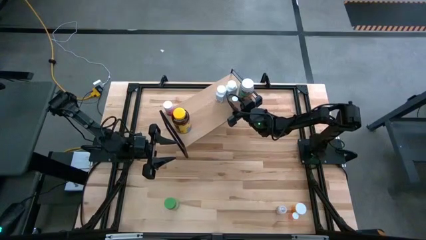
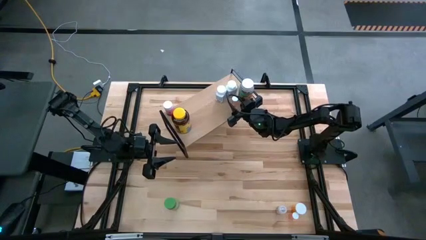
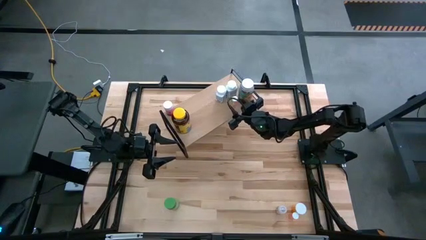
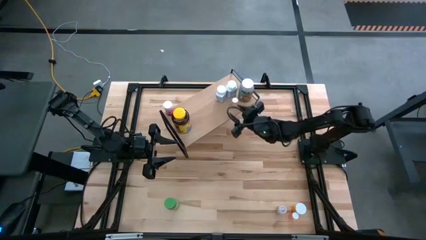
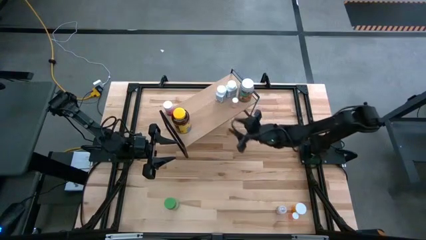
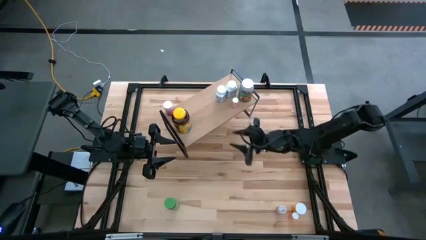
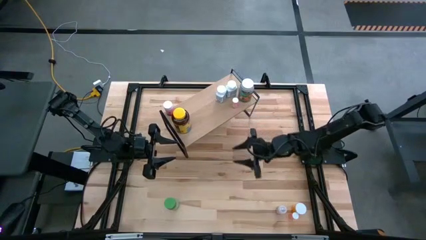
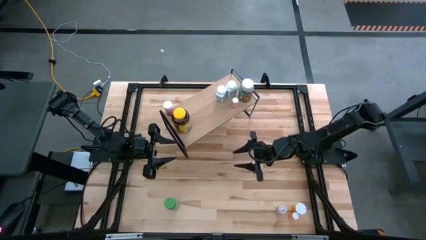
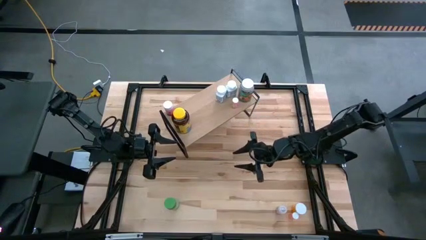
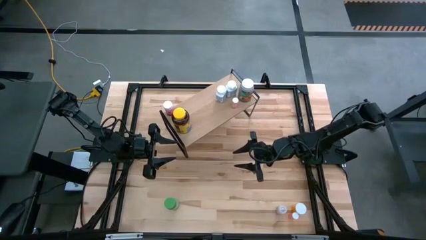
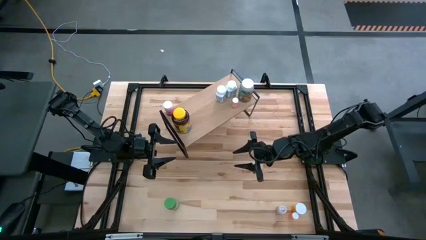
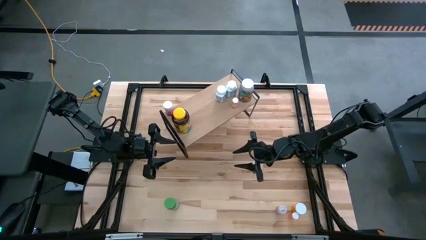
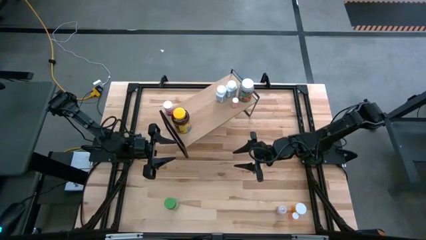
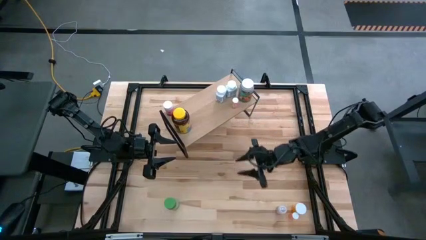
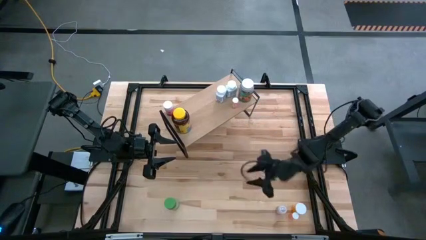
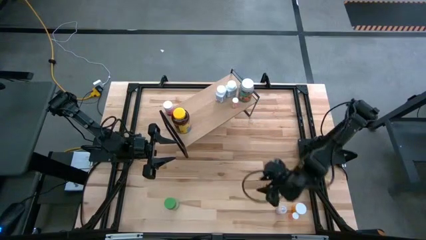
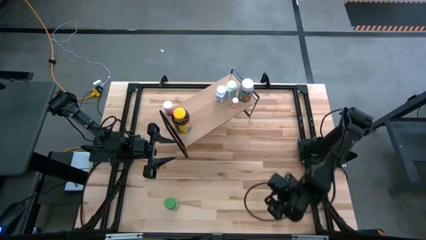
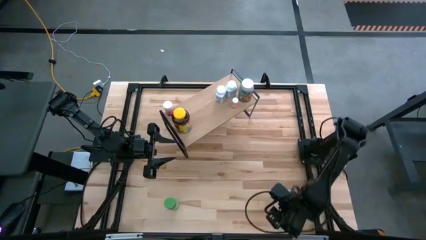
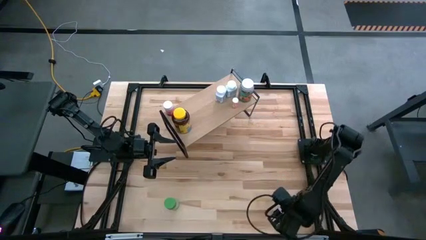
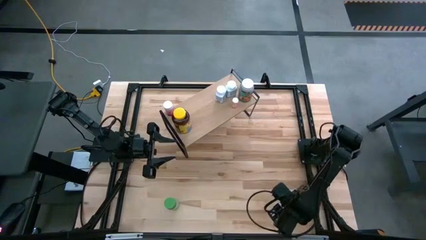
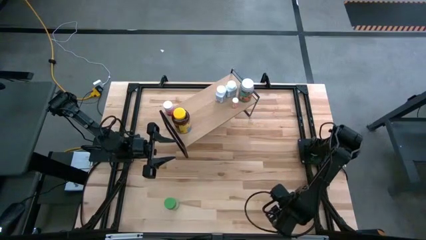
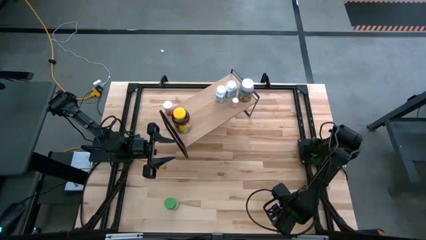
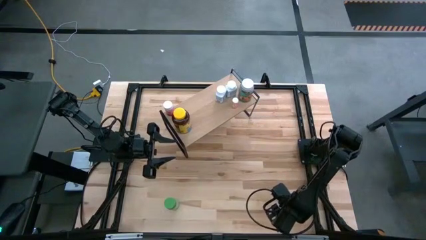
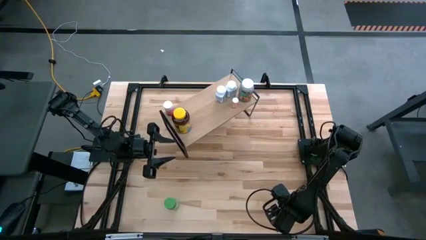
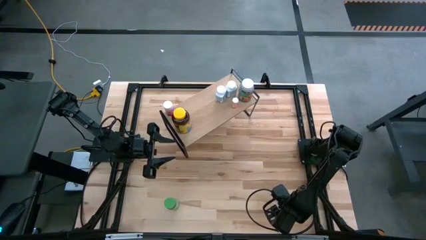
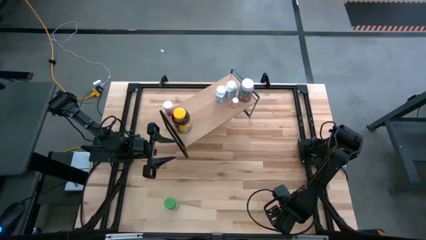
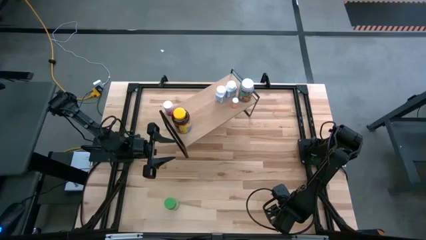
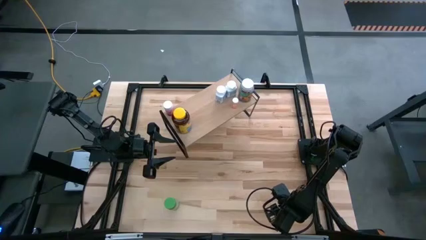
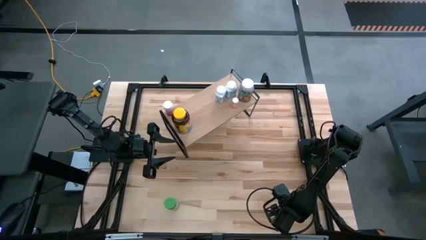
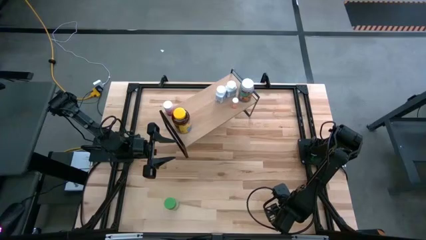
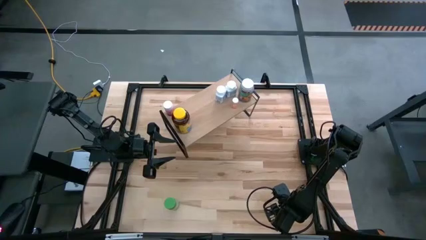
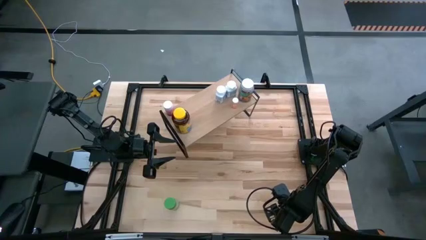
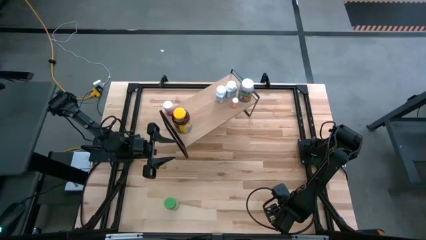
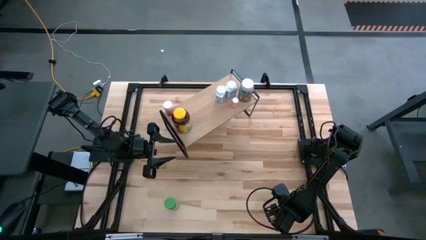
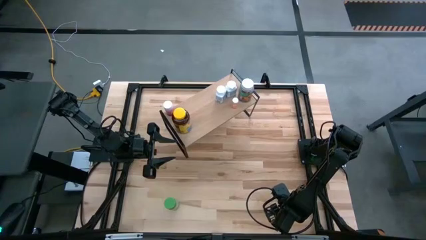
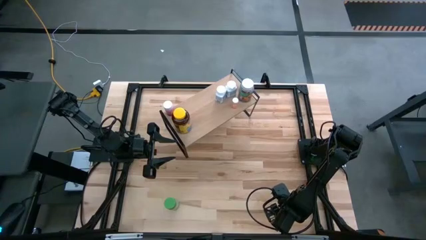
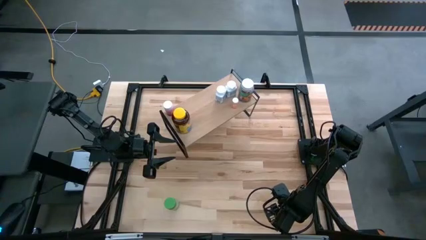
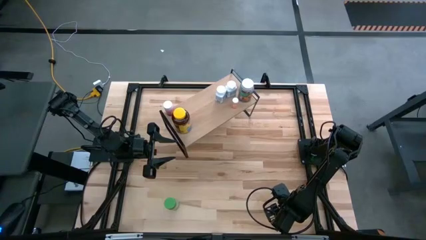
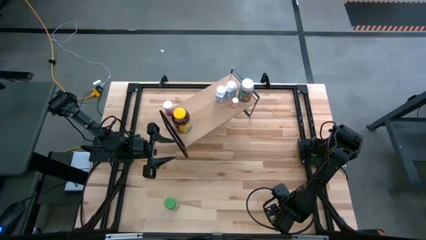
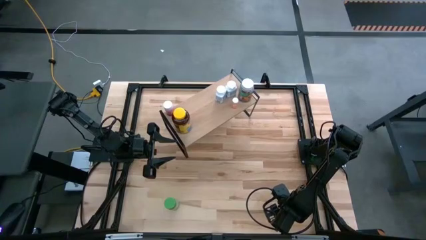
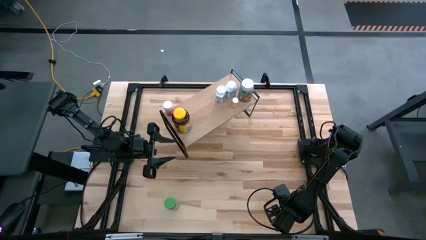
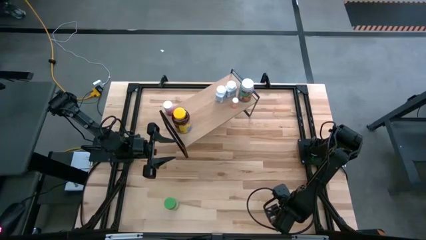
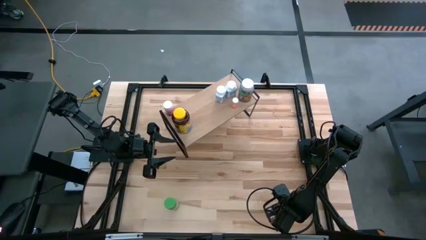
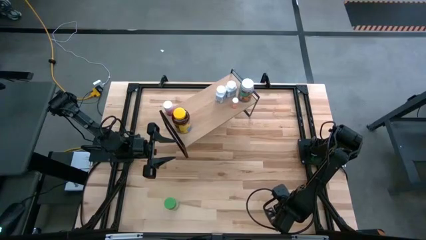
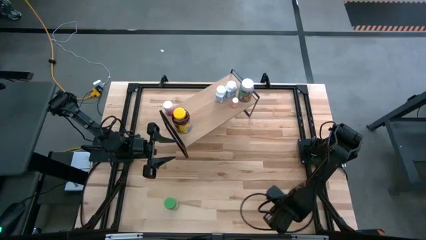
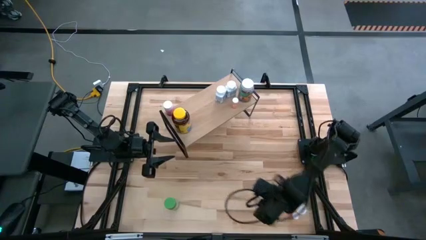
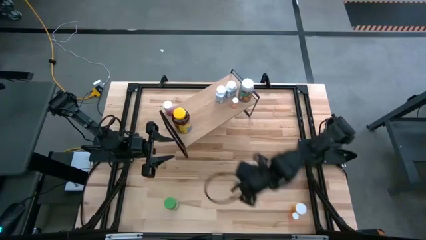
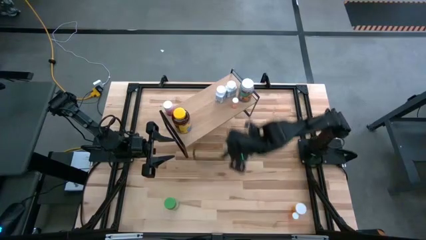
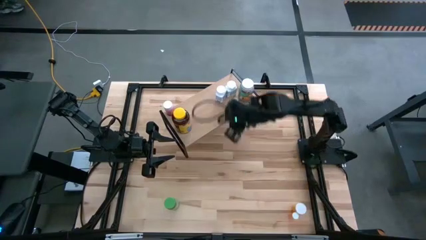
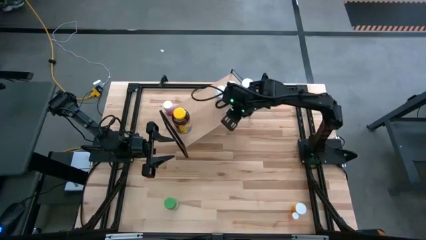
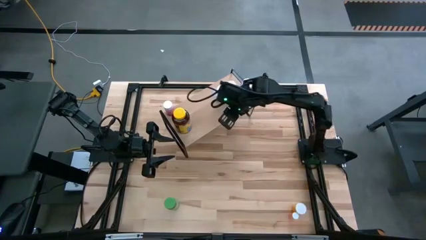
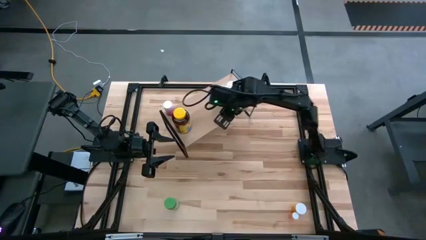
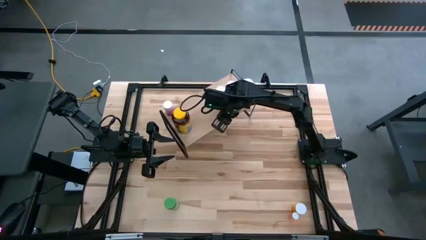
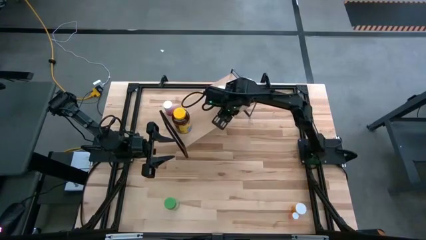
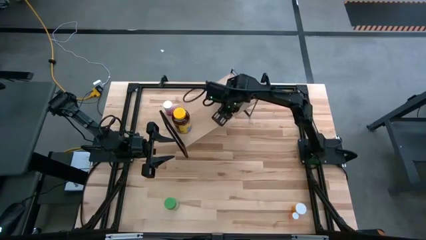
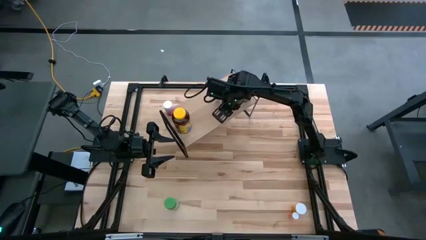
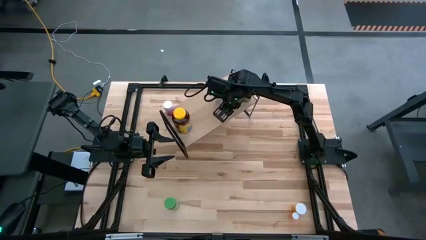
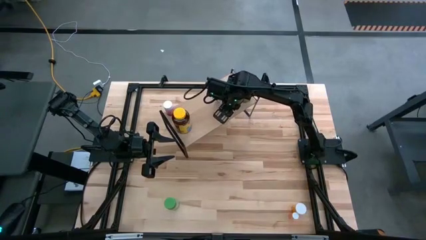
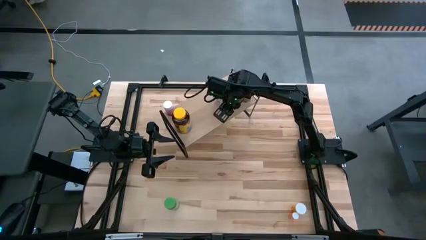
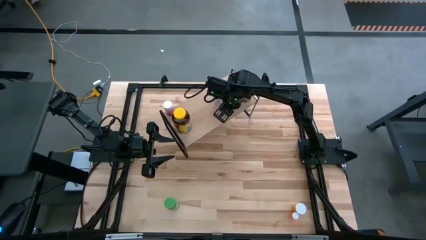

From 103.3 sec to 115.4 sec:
Task: Pick and place medicine bottles onto shelf by color
Put the transparent medicine bottle on the shelf
